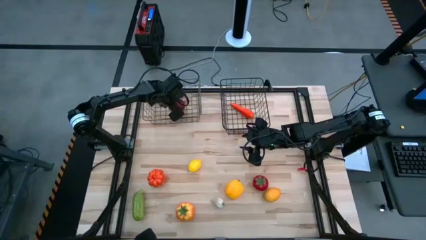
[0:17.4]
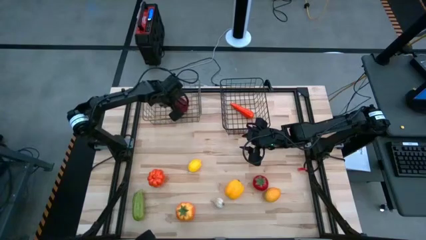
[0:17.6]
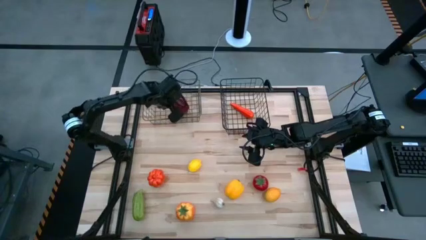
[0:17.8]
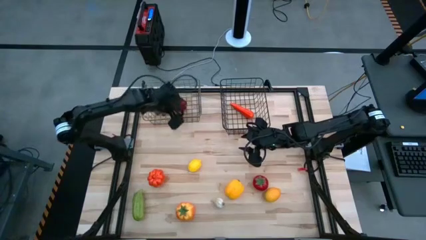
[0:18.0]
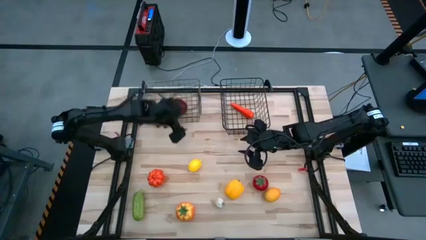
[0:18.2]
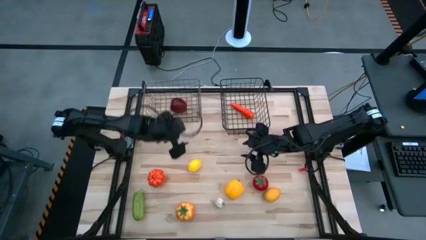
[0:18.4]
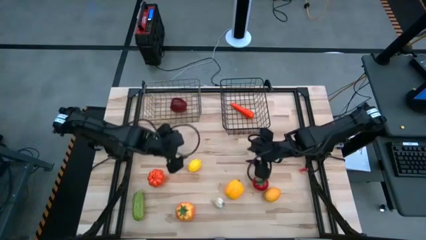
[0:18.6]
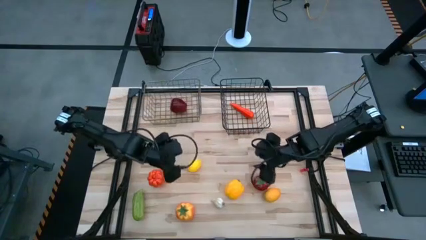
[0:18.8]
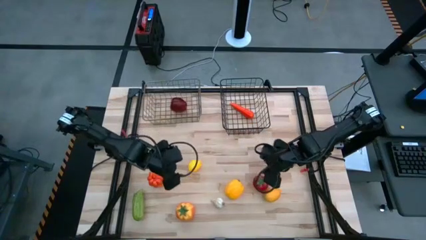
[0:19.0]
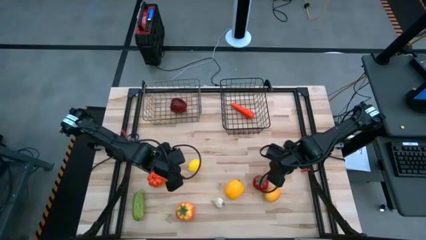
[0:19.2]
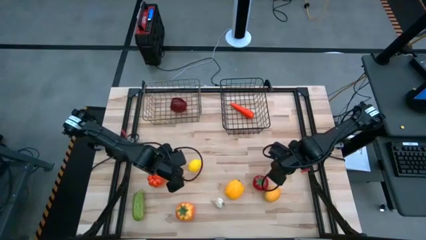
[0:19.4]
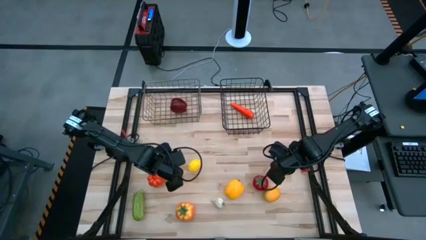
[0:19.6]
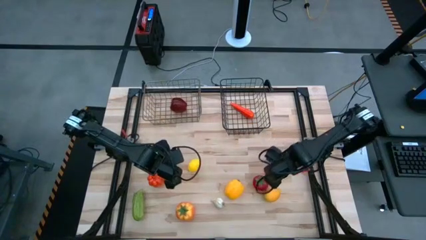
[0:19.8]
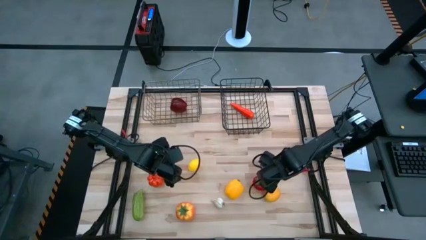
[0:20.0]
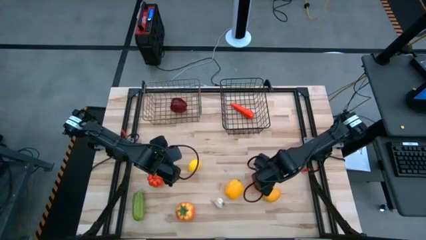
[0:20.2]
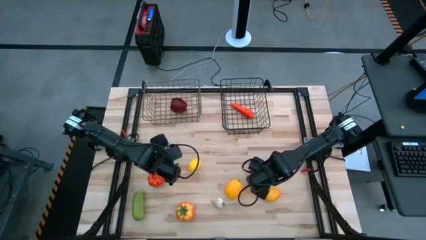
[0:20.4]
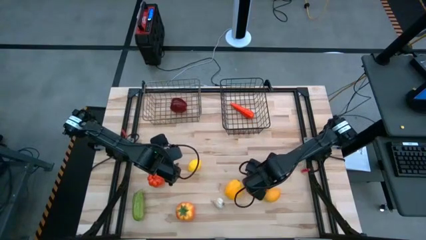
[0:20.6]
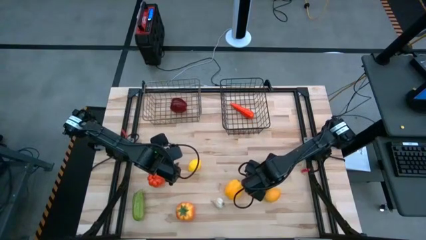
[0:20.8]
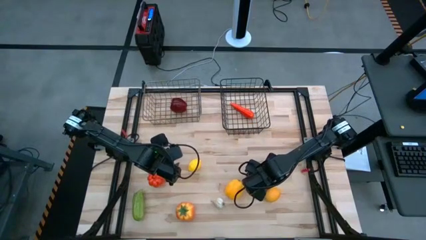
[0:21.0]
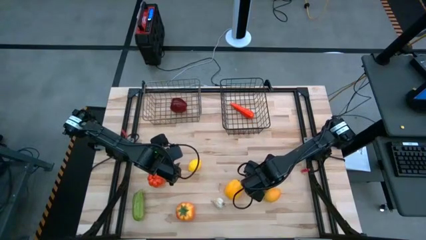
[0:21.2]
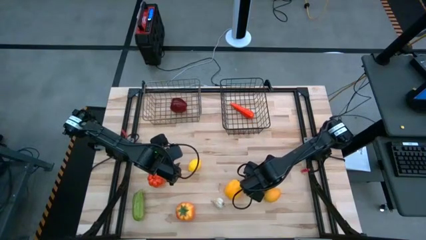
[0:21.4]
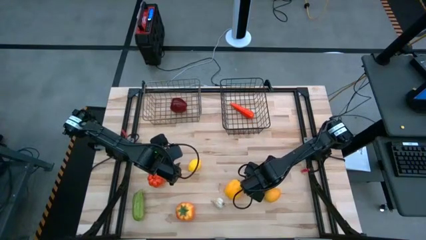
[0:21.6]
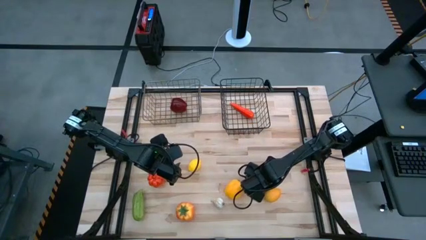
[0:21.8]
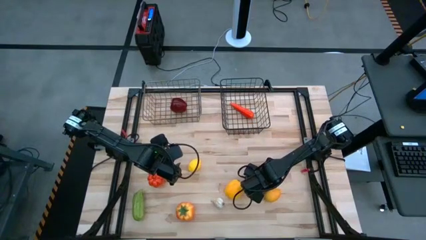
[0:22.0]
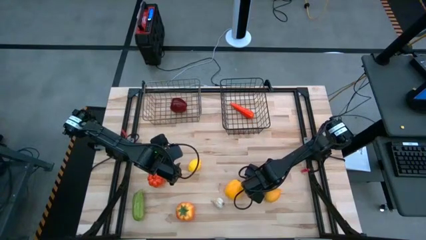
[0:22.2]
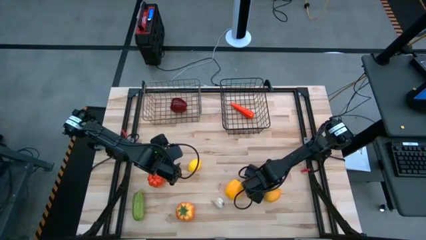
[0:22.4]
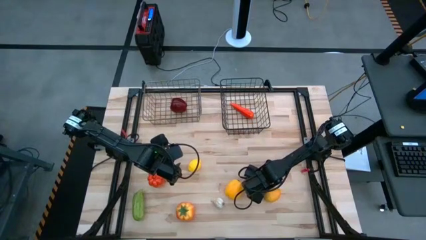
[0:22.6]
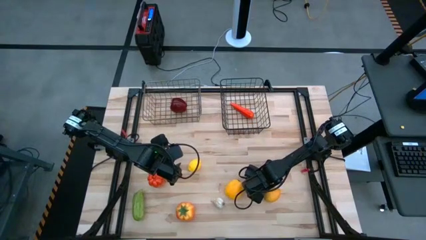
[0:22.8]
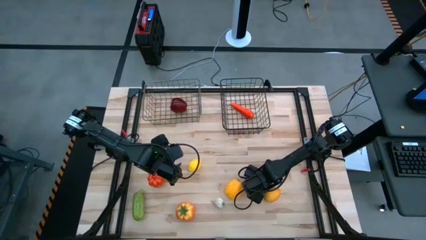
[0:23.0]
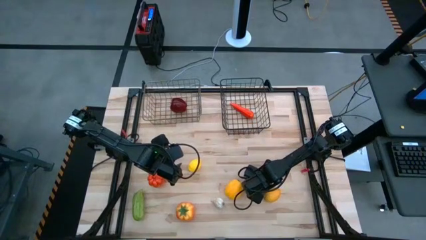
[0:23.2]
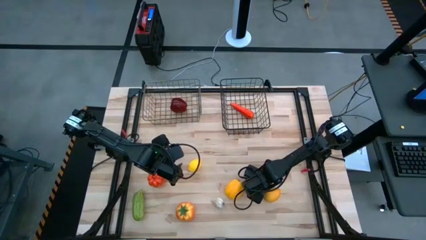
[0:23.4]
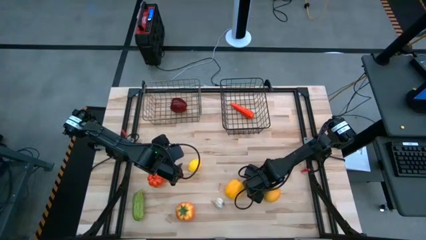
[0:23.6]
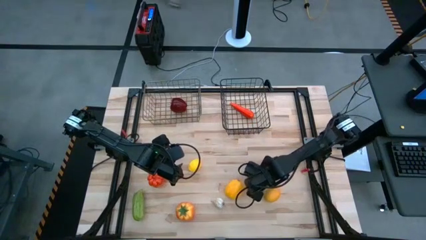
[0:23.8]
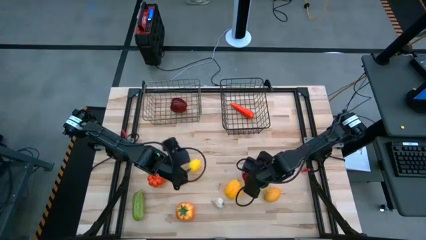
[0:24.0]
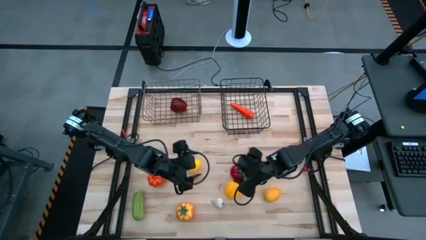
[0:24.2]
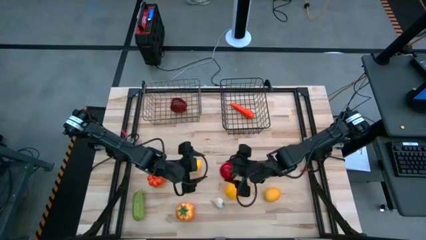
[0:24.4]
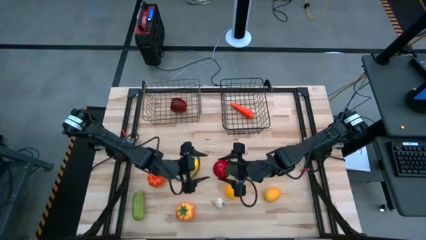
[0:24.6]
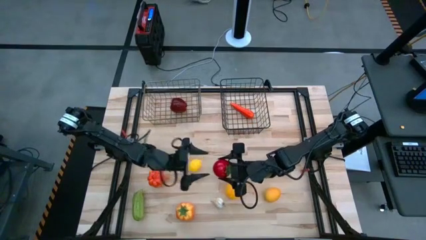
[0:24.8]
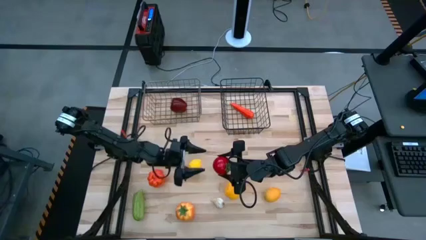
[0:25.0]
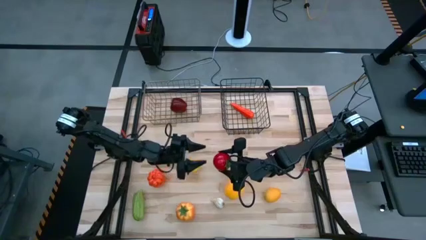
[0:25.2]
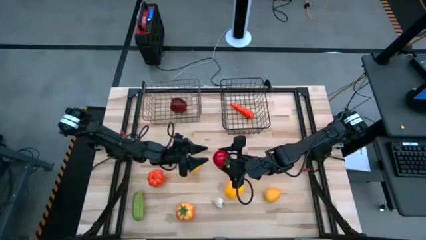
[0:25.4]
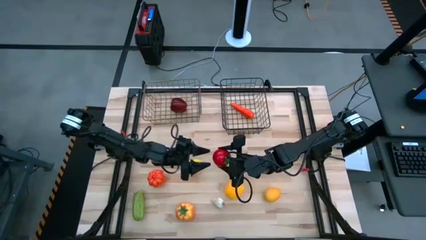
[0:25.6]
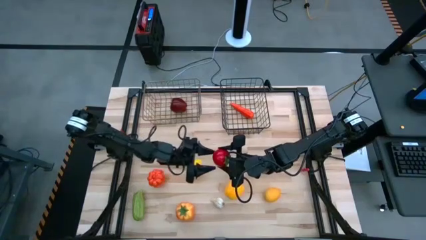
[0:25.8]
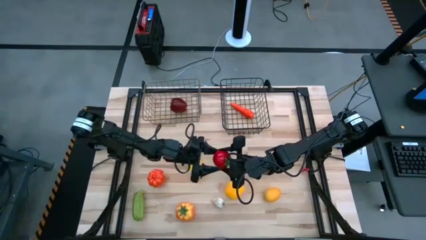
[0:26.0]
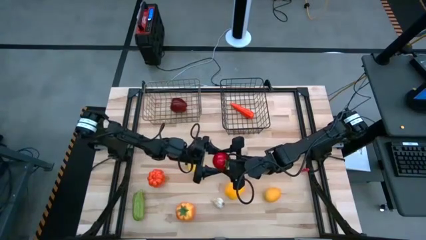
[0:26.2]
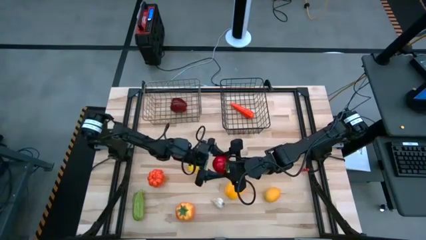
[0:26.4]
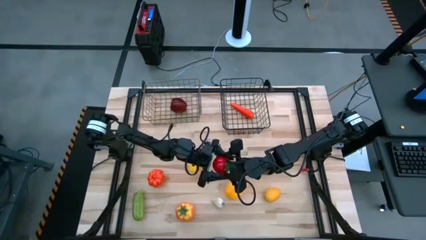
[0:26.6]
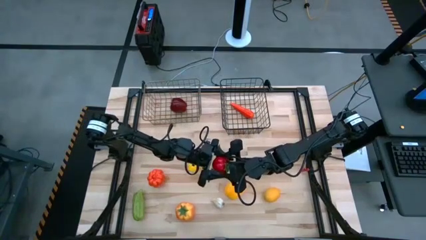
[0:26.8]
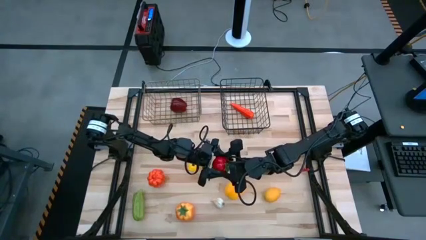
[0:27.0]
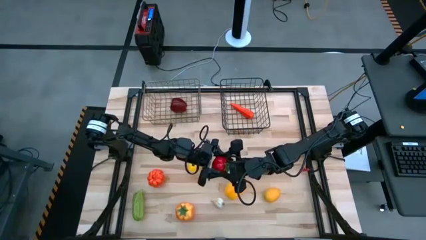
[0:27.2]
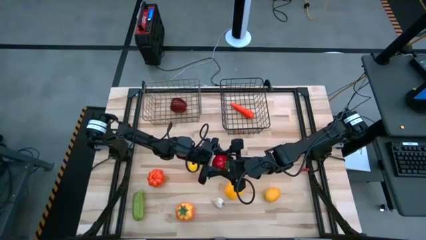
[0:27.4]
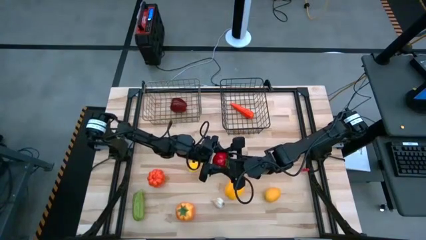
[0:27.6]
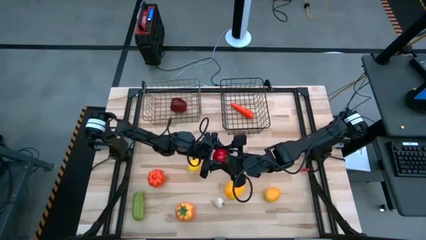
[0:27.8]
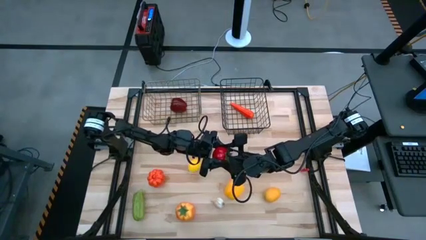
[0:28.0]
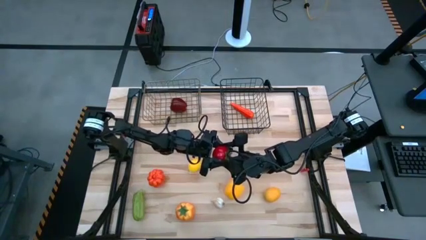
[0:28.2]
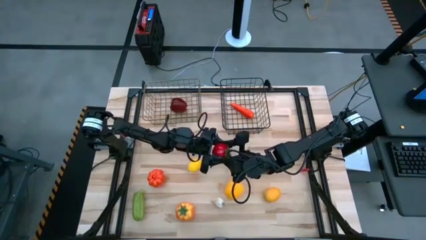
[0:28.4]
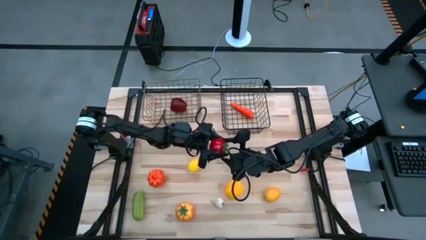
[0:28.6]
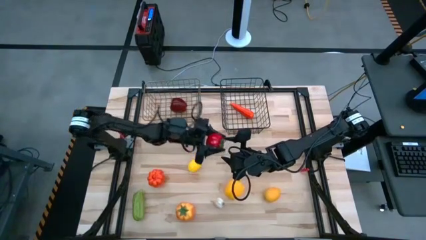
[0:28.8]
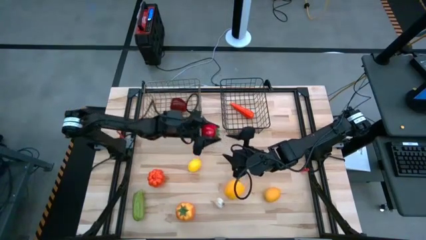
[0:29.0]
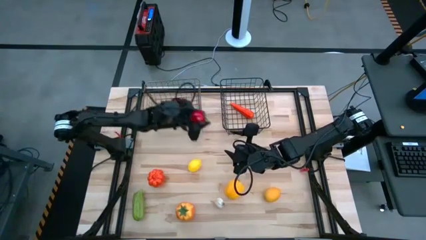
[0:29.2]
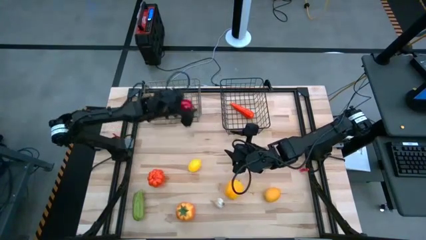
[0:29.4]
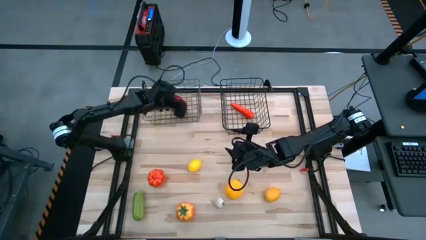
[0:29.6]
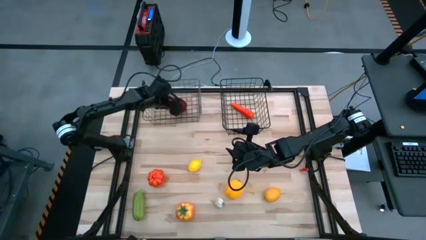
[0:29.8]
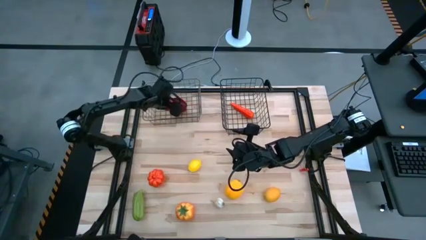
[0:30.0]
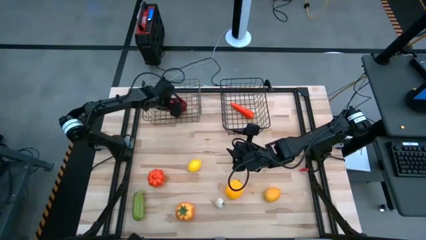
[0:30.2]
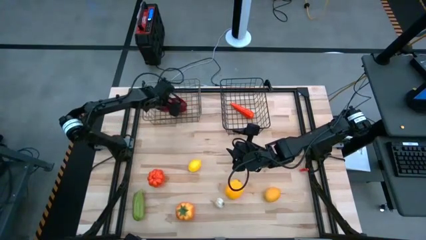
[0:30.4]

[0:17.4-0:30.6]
Task: Sort produce into baskets
Put the tomato into the gold wire basket

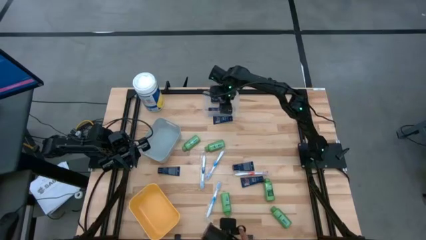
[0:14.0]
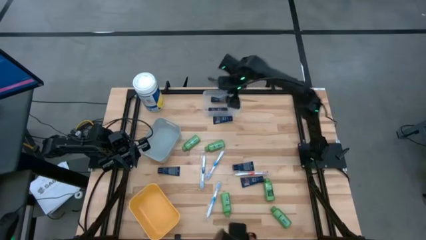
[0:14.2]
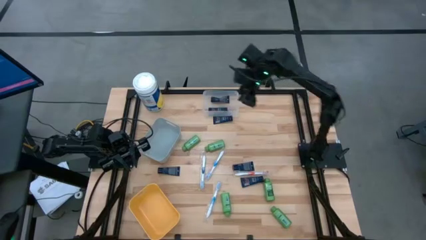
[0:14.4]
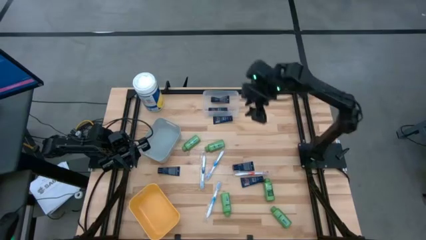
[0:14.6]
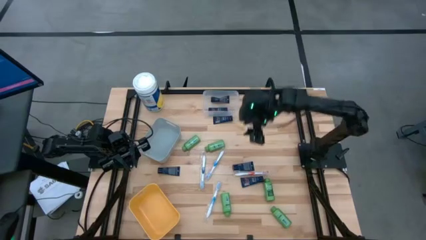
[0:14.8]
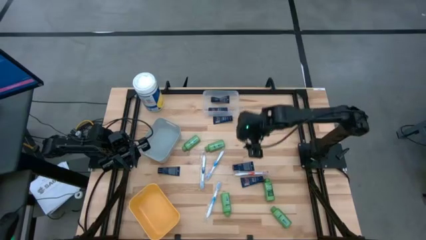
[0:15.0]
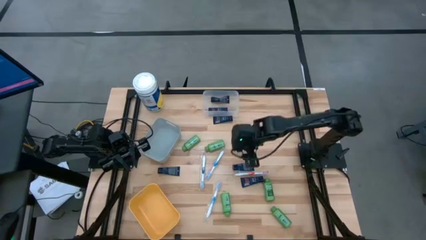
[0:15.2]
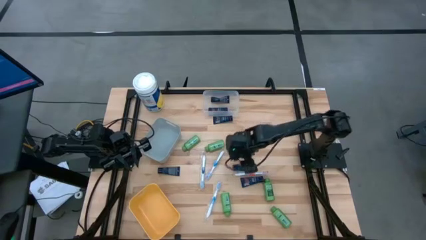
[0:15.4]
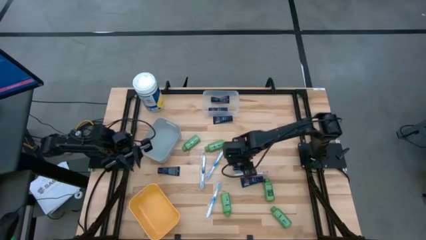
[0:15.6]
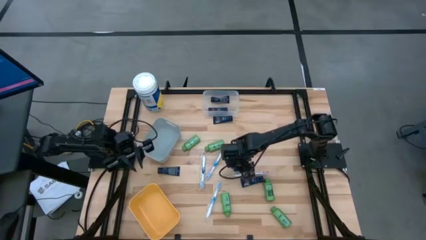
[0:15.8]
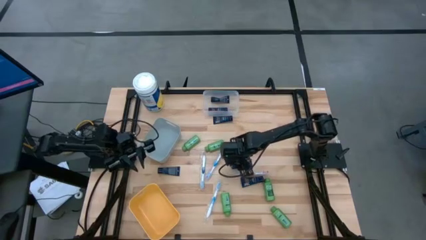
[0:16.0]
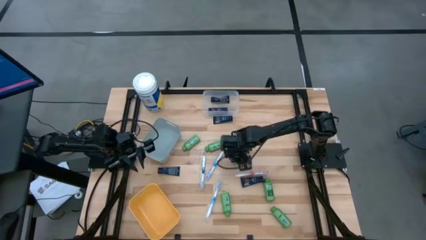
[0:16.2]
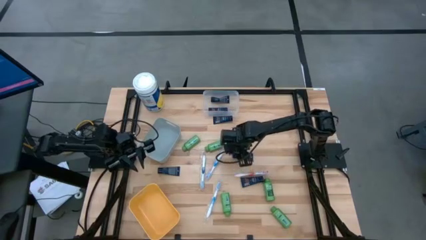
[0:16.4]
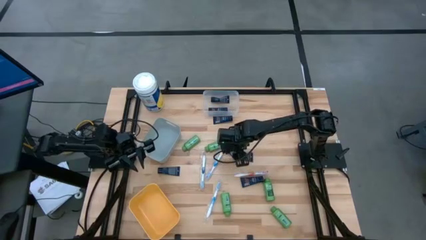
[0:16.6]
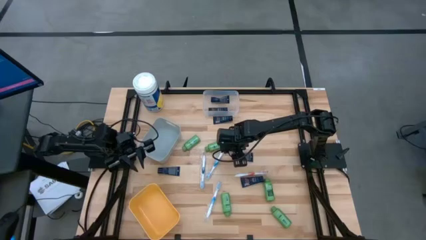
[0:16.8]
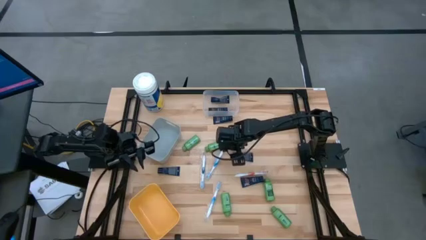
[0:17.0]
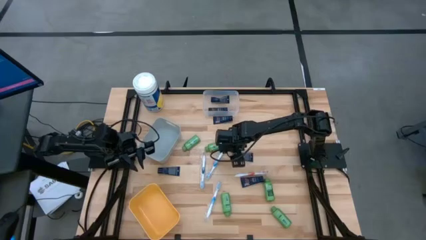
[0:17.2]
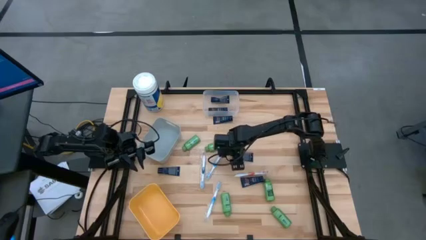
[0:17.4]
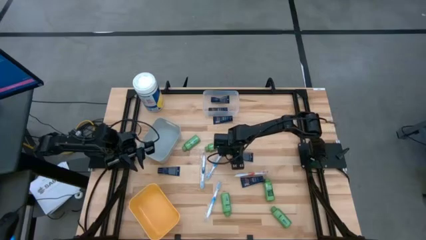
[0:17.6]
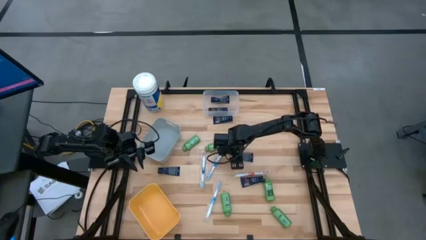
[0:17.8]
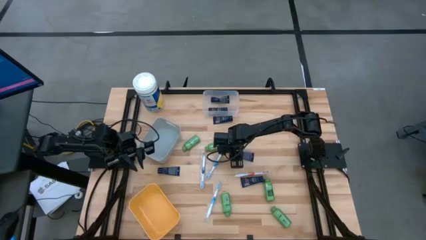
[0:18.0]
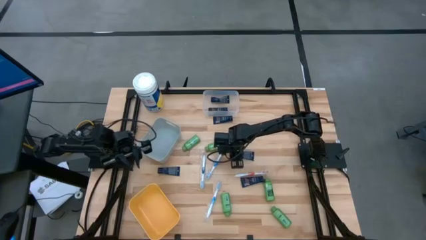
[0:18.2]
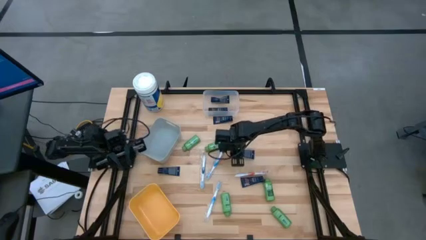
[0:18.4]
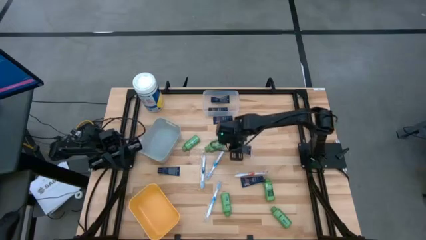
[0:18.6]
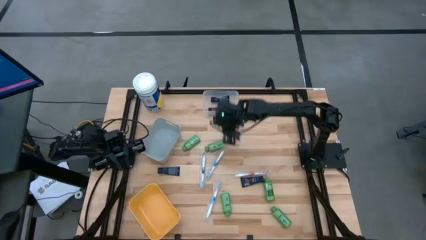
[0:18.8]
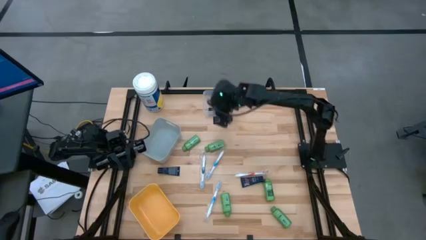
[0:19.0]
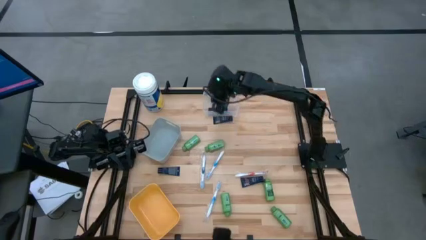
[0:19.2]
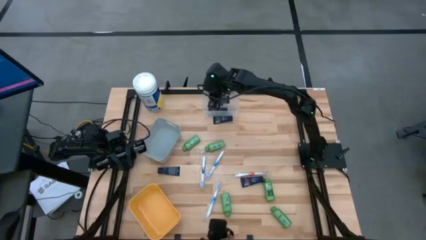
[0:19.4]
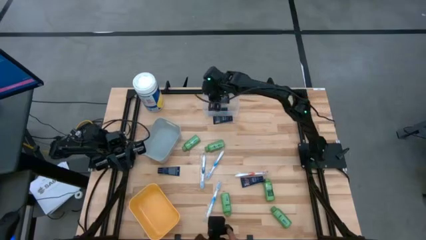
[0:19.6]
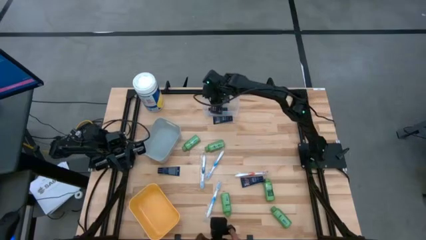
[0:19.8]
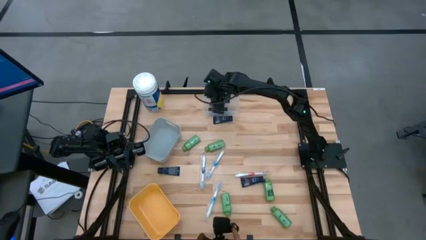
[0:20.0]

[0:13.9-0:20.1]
Task: Pick & Place Travel size toiletries
Put the blue shave cream into the transparent bin
